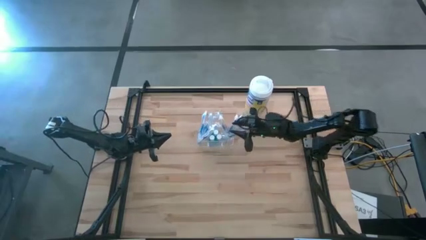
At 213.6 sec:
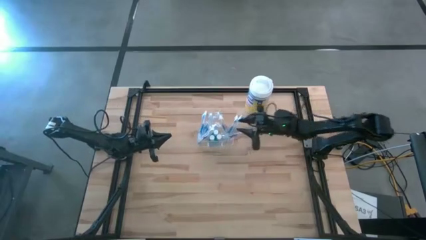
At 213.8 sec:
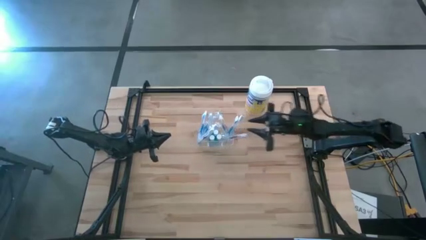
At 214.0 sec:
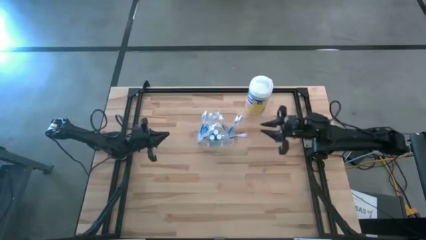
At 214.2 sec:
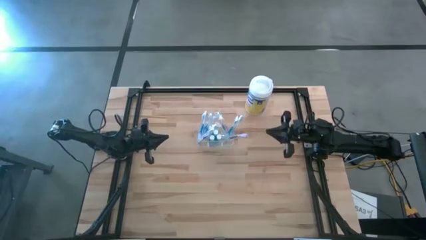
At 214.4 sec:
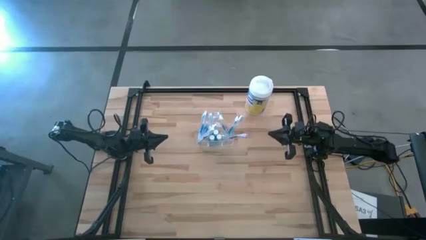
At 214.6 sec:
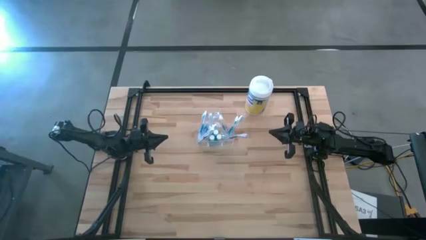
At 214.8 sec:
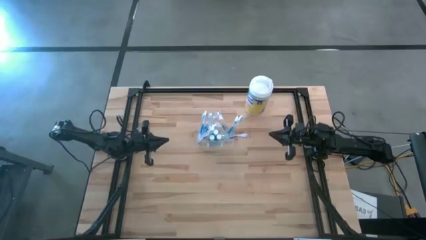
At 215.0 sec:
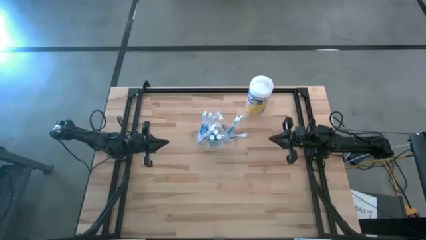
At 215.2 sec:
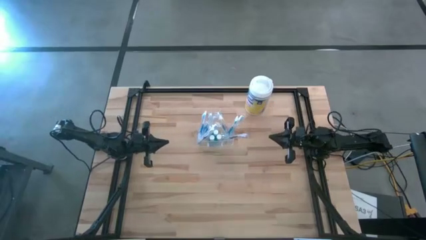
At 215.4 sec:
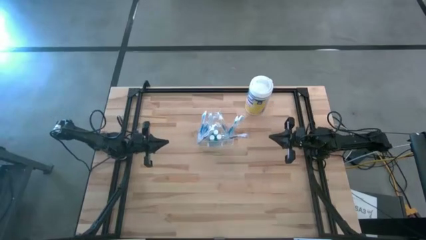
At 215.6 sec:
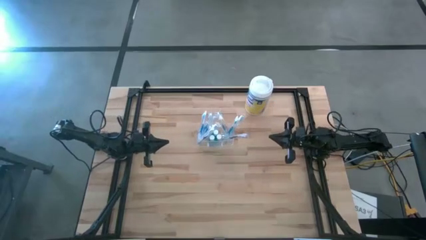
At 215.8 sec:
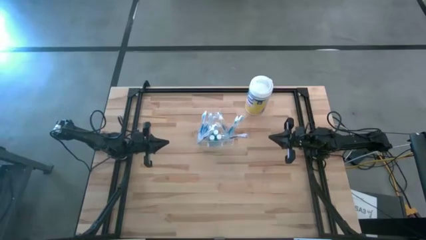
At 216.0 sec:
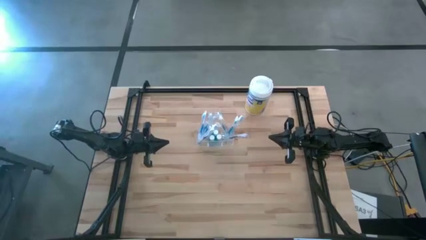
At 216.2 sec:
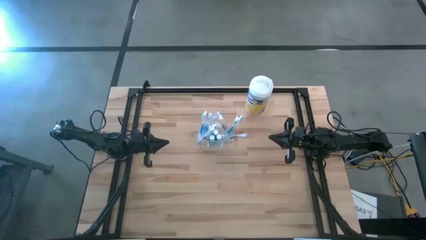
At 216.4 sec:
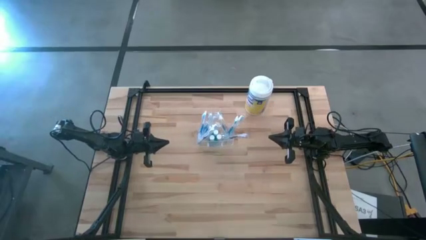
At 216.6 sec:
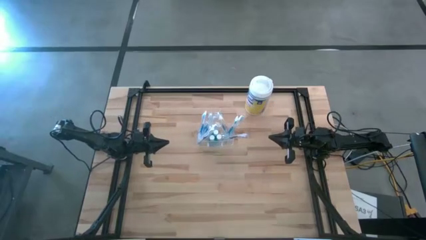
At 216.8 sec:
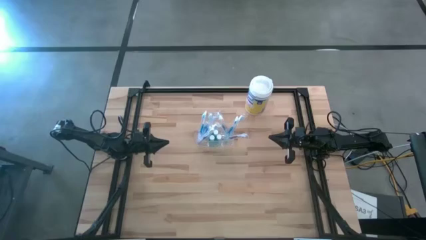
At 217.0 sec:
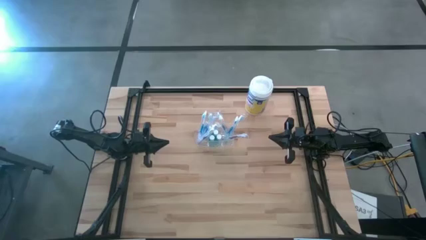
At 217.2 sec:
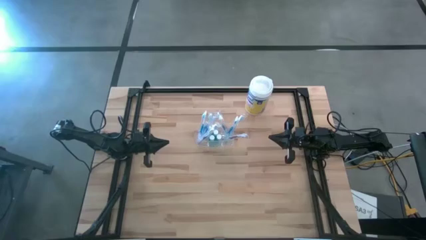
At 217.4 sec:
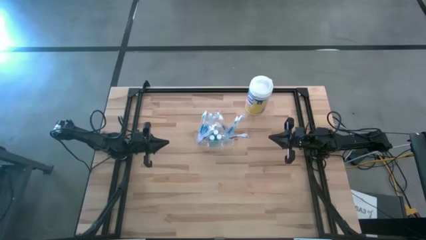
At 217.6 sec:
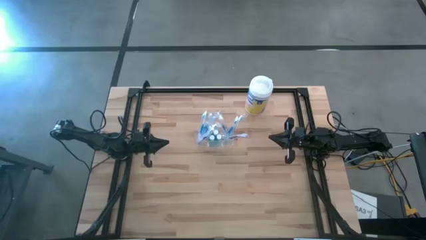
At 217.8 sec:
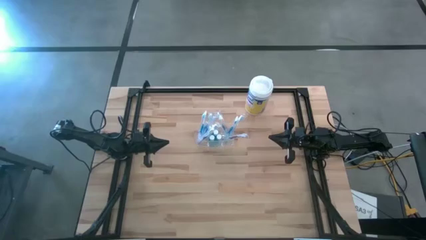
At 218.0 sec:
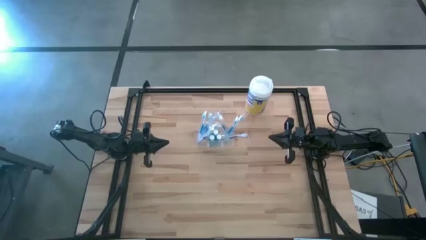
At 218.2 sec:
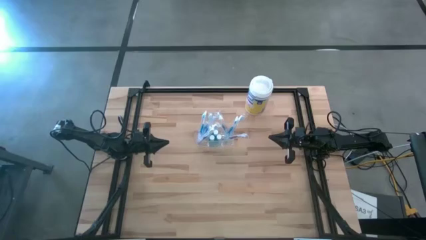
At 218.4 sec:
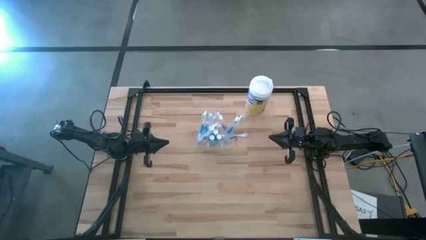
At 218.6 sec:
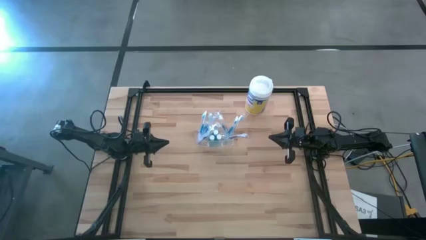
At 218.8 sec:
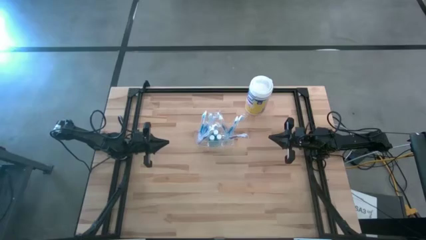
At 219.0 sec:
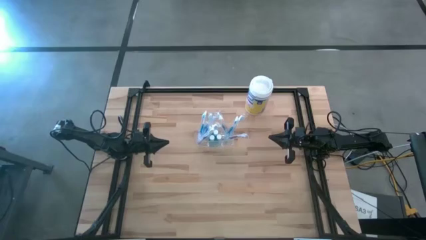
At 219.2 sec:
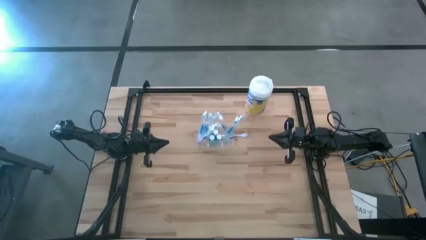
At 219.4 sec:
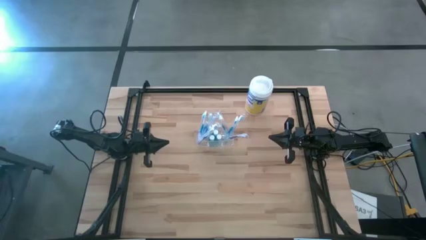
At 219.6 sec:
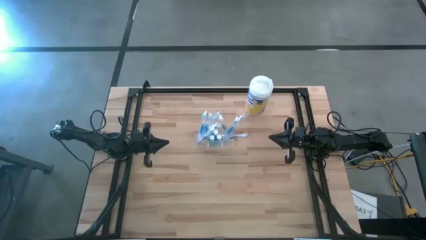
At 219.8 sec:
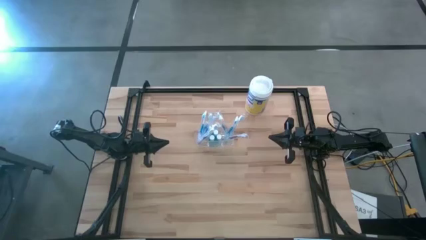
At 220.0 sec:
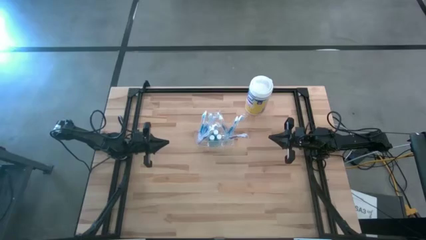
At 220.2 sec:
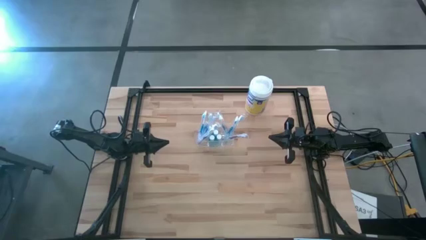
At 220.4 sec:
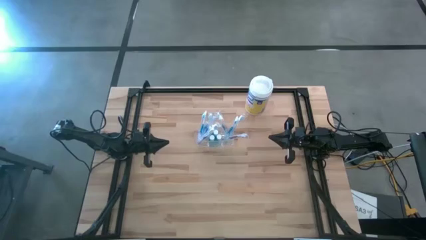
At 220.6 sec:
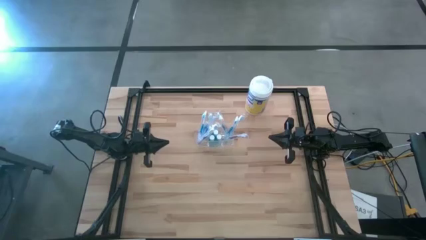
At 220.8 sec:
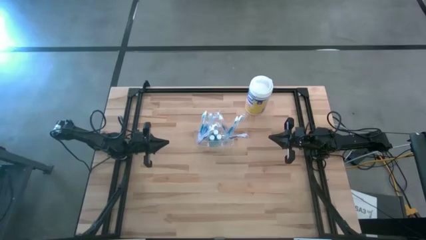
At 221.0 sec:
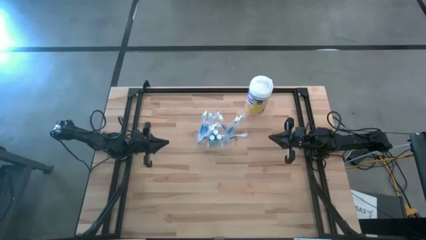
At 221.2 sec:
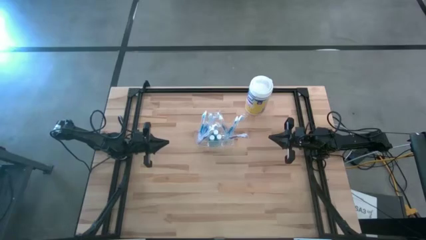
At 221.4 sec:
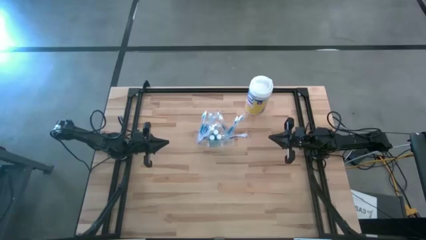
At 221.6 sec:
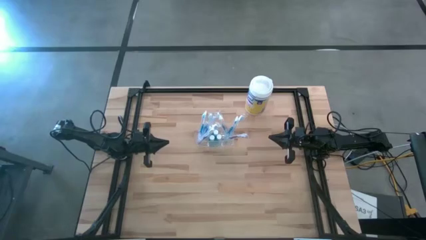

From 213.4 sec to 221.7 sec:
Task: Pick & Place toothbrushing station
Return to Home Position
